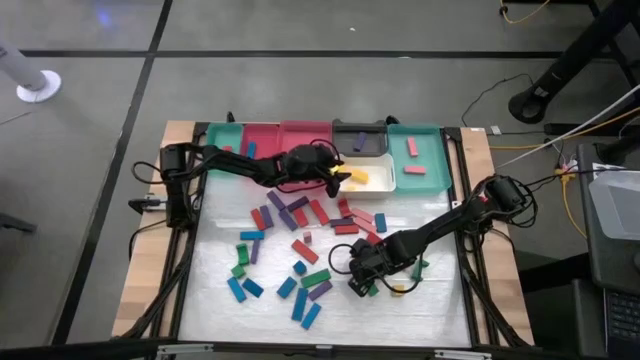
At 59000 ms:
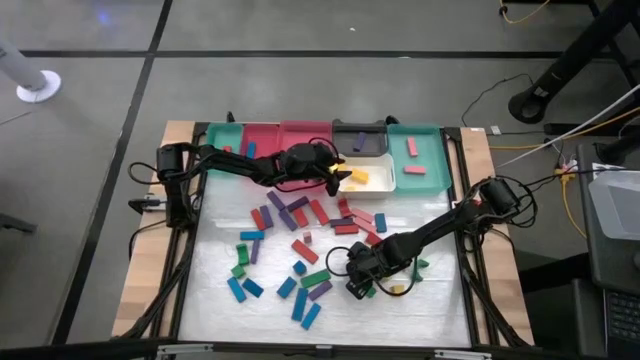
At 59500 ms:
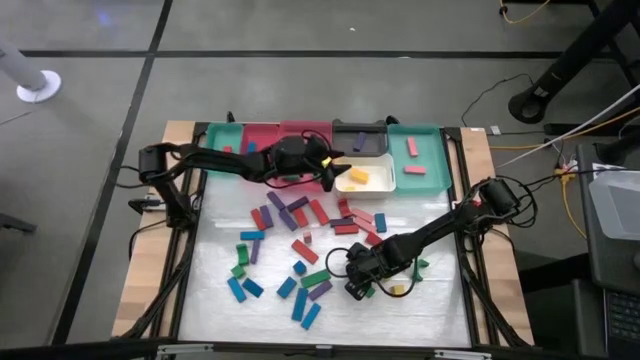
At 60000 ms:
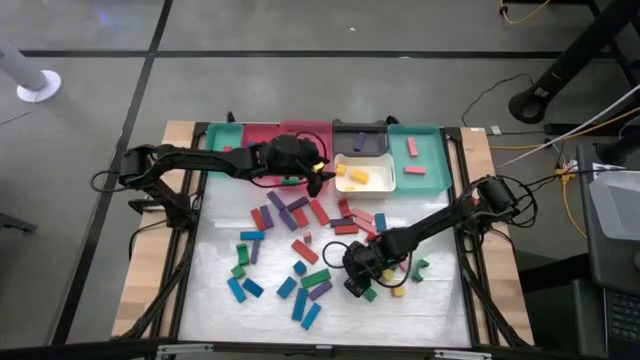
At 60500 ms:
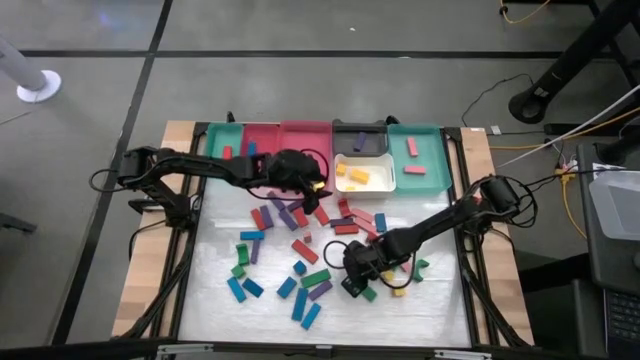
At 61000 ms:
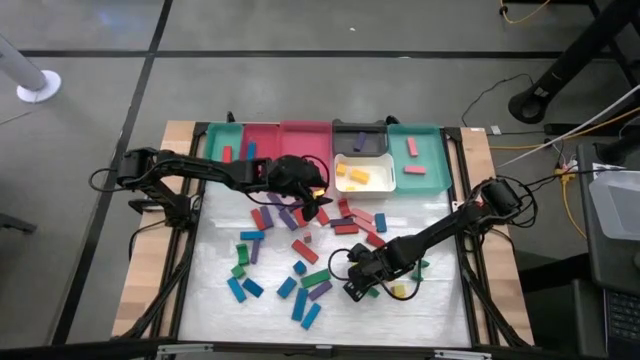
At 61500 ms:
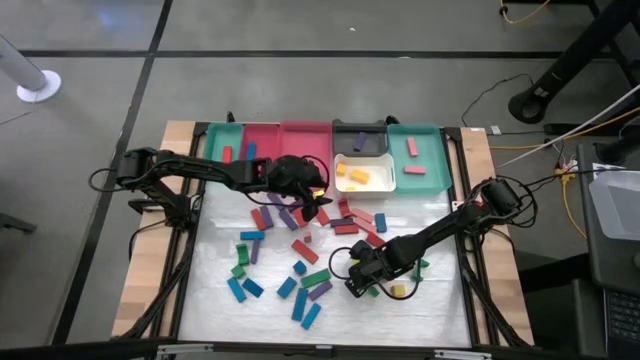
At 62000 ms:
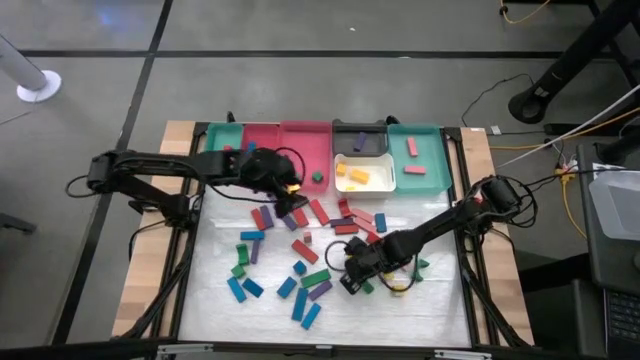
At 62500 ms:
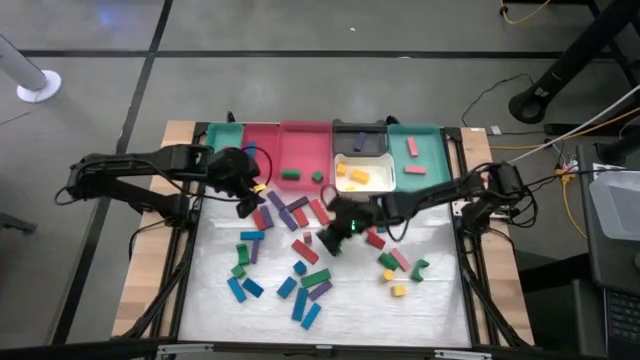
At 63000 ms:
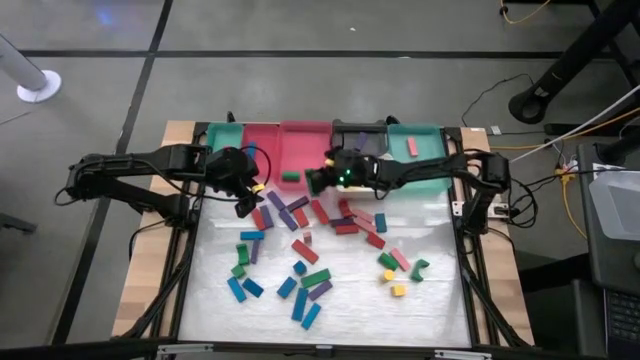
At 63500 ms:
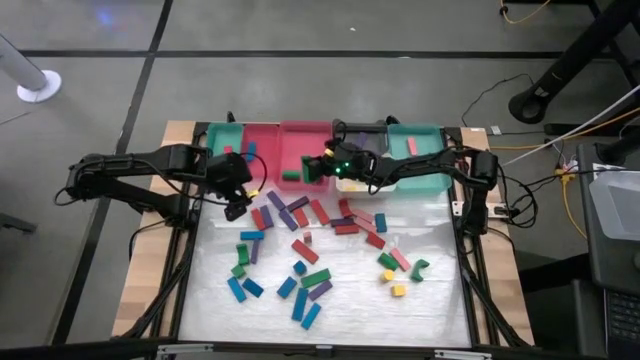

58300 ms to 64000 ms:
Task: Sort blocks
Put the green block into the right pink bin

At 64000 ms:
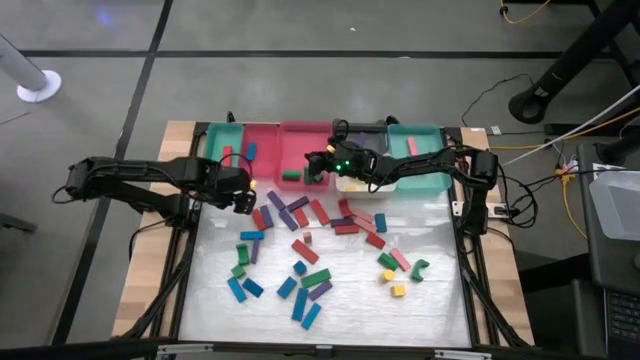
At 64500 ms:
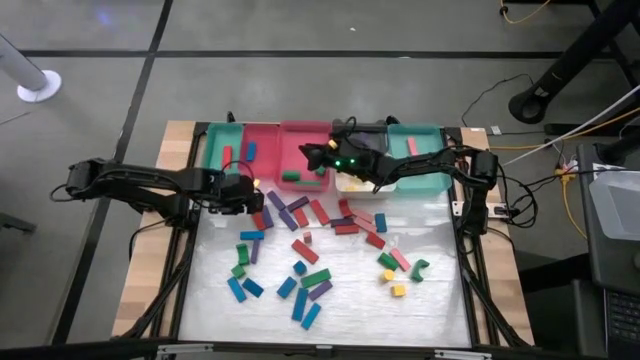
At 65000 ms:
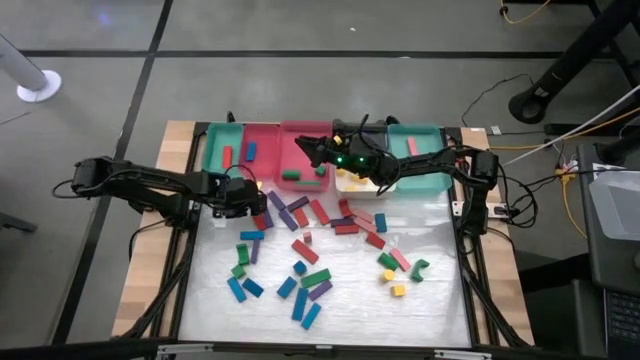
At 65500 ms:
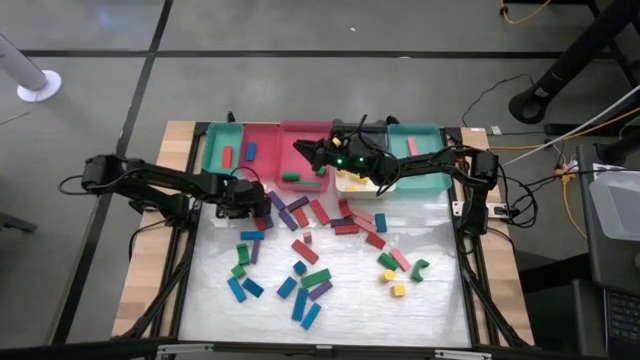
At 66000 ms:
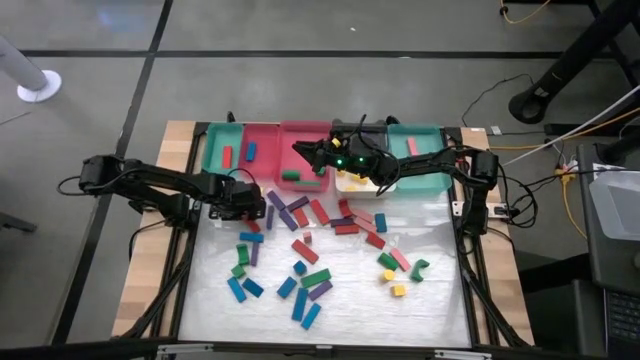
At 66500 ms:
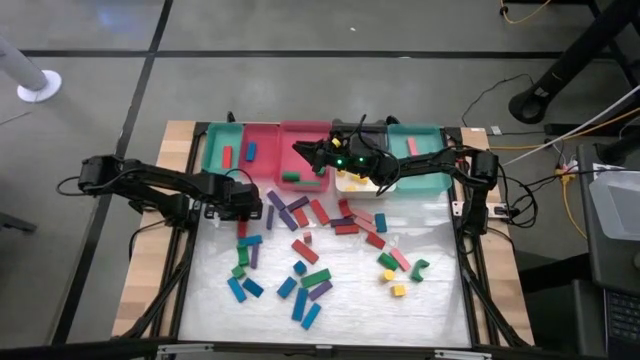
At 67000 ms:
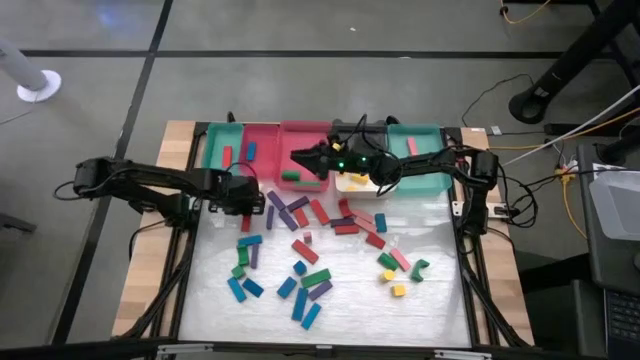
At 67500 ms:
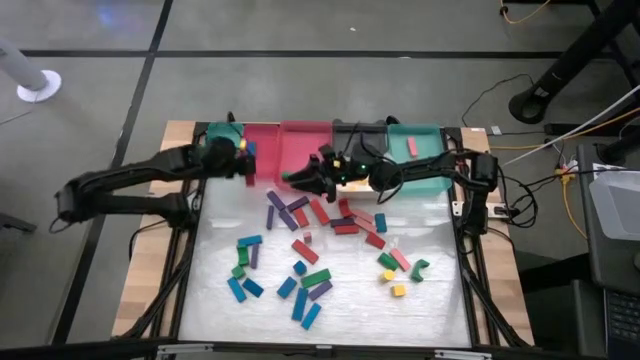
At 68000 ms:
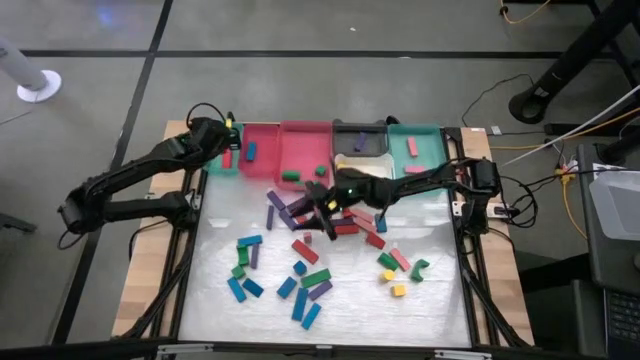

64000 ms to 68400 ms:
Put the red block into the left green bin

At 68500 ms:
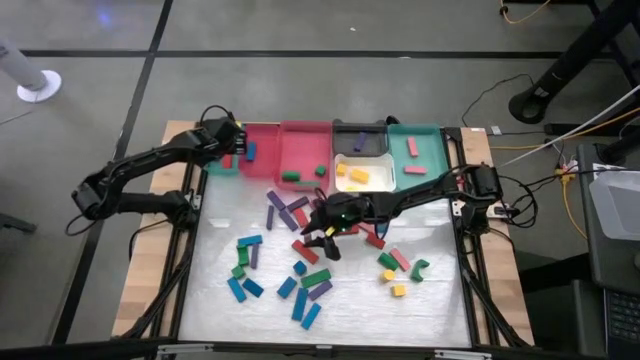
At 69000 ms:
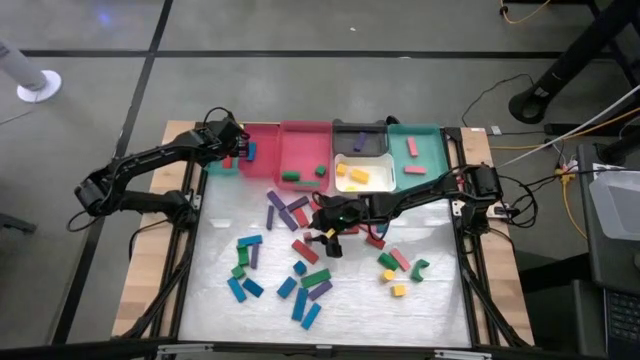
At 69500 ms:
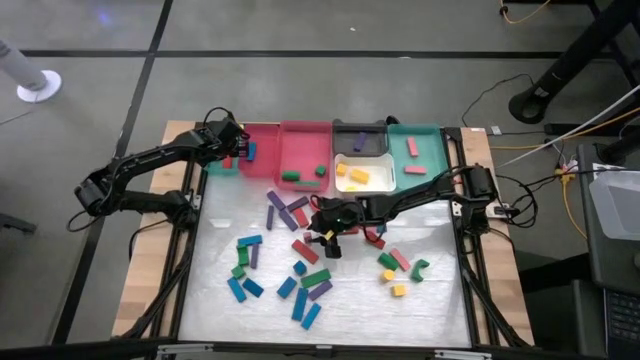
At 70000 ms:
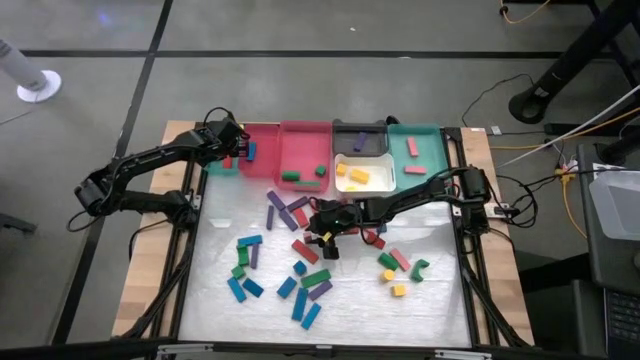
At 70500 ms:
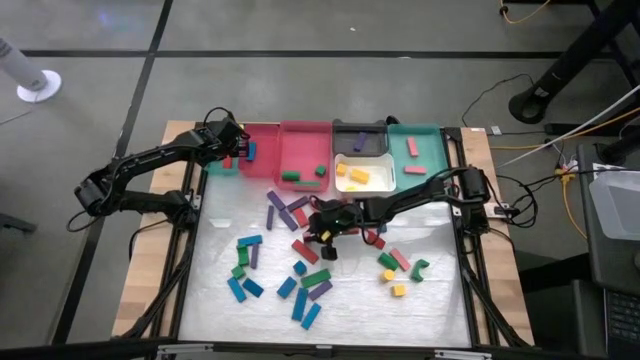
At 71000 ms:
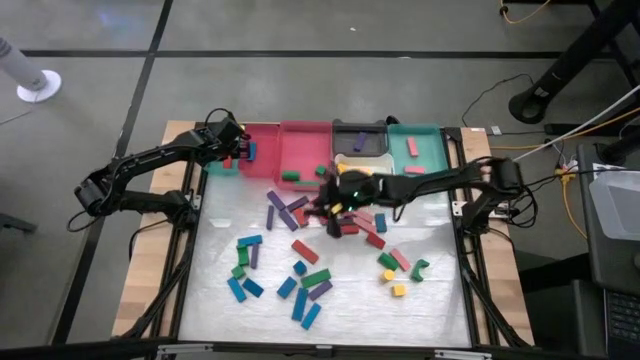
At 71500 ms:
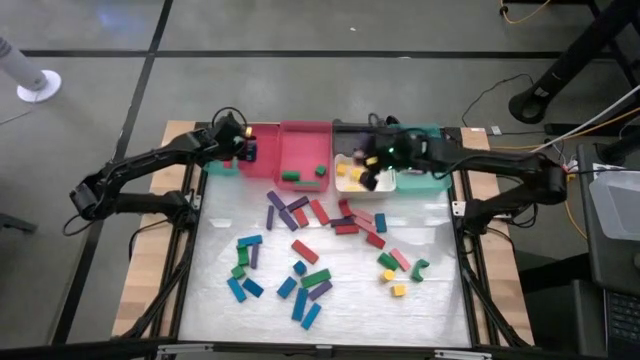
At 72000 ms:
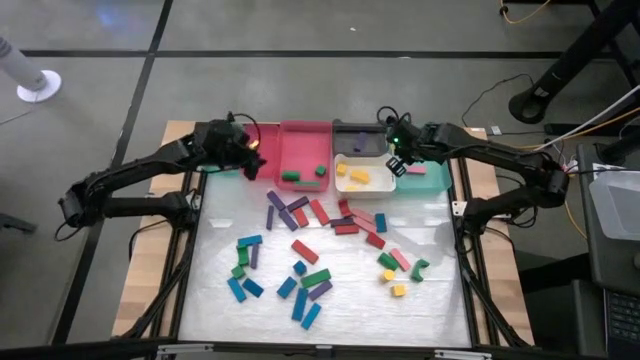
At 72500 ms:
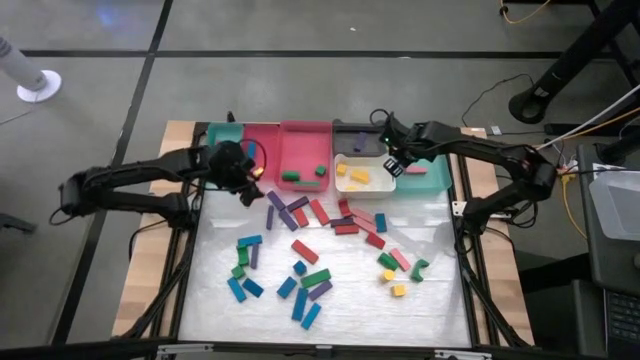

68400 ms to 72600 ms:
Put the pink block into the right green bin

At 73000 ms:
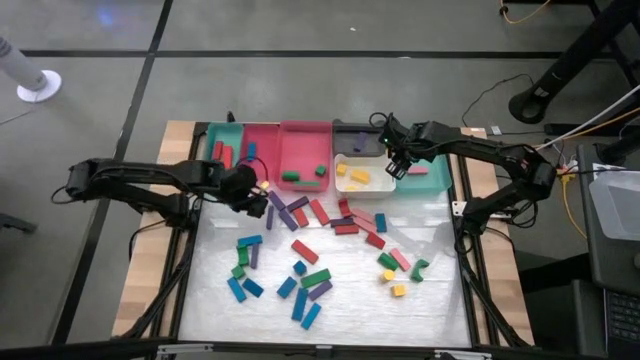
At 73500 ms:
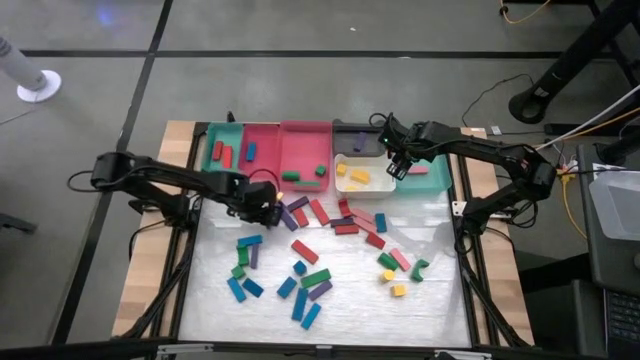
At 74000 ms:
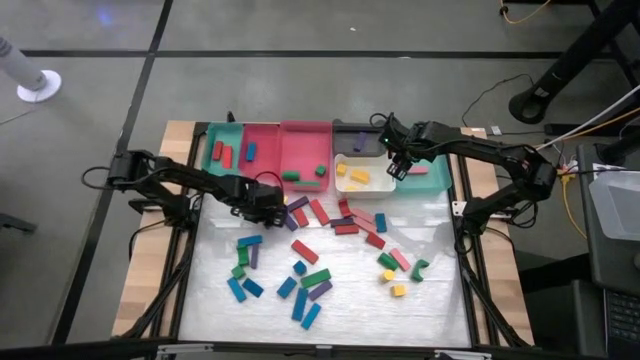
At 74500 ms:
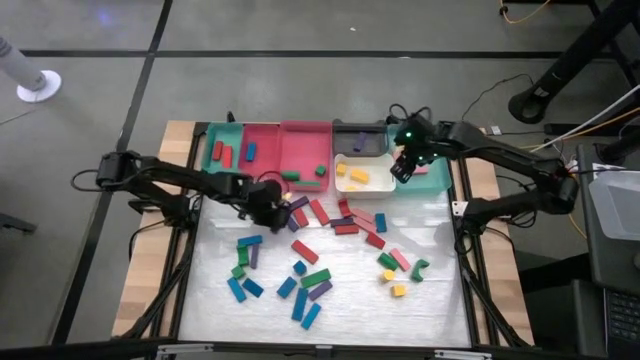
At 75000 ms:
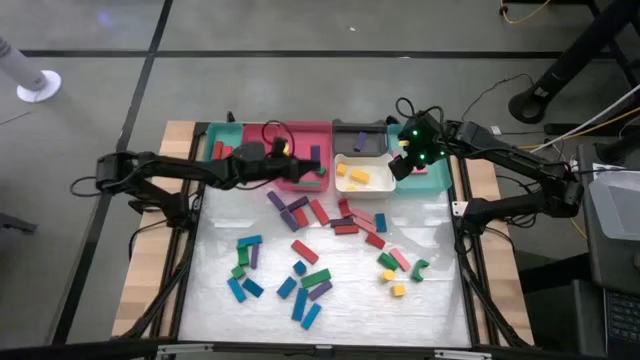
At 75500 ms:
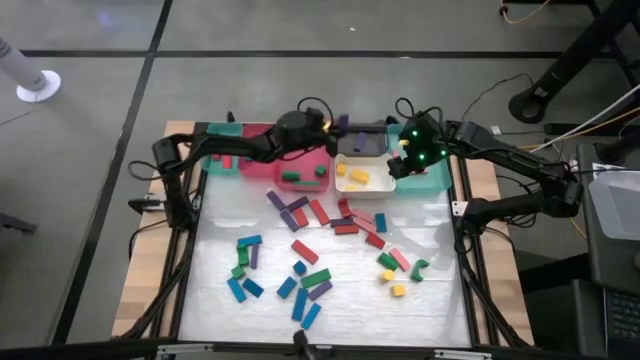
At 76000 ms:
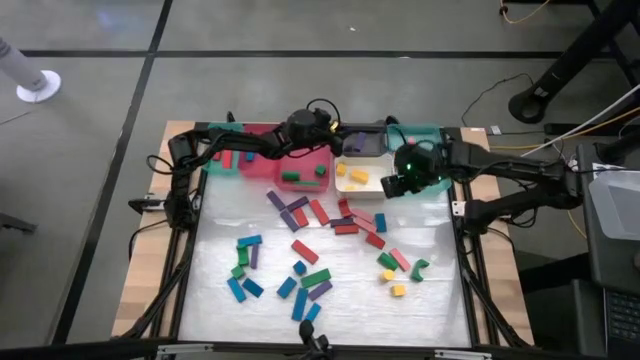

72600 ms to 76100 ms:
Put the violet block into the black bin

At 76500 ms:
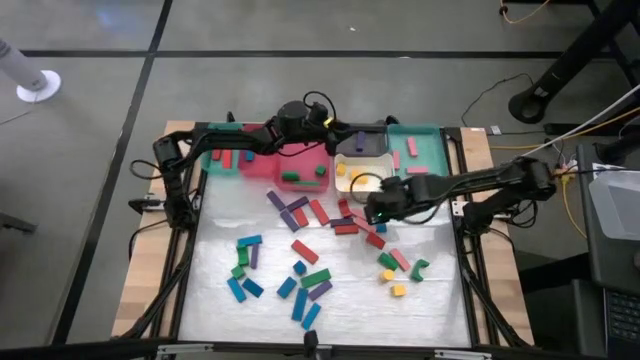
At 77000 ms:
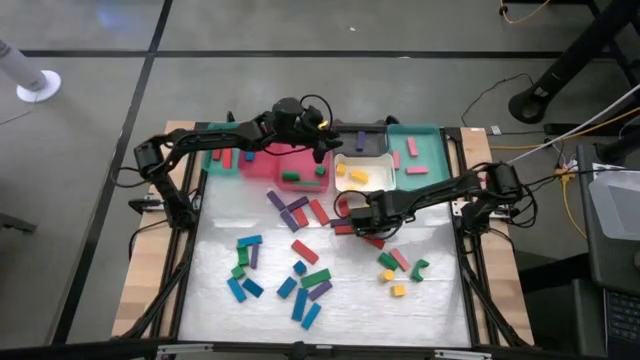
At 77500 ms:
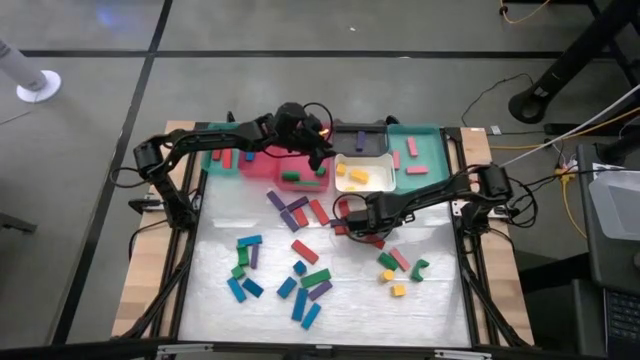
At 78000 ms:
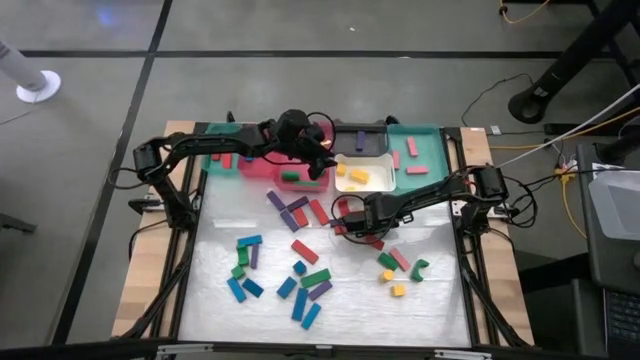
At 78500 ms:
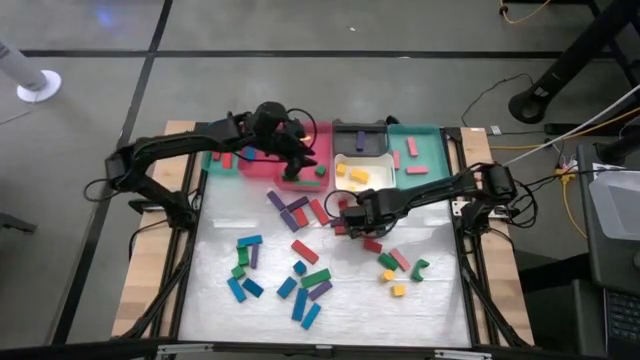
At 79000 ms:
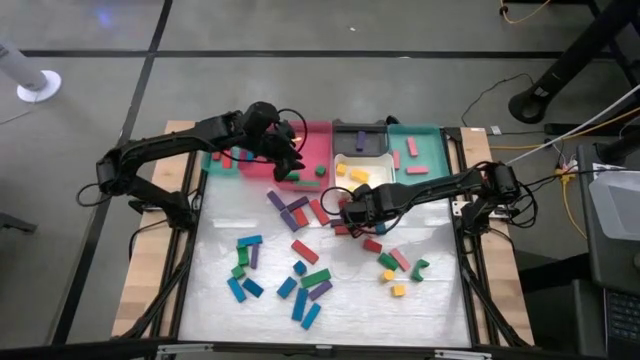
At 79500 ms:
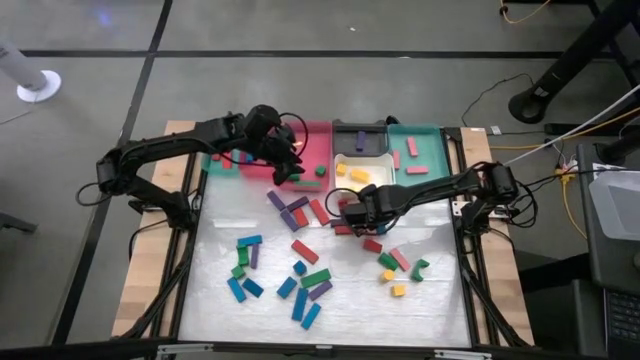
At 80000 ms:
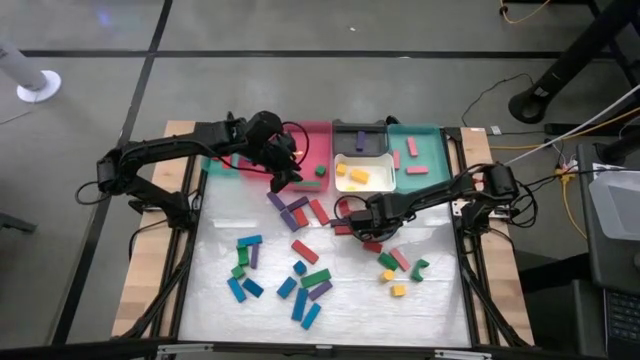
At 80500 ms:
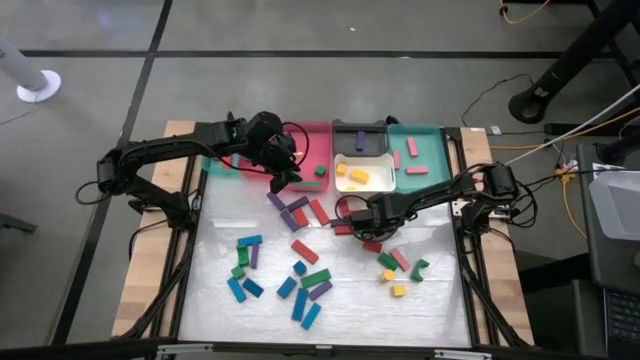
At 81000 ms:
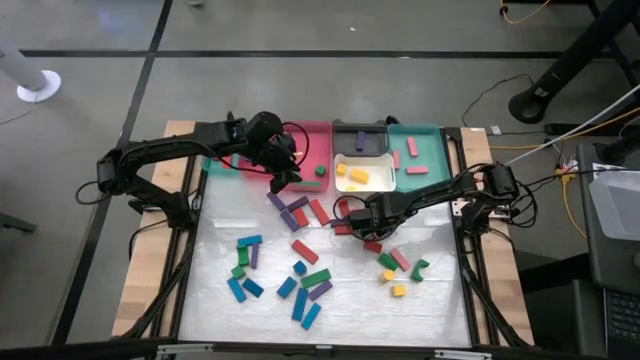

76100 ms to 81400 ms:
Put the blue block into the left pink bin
